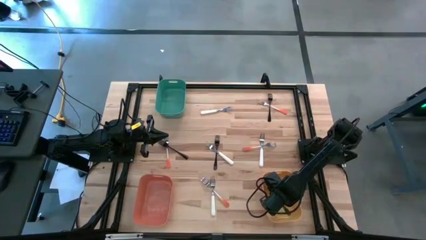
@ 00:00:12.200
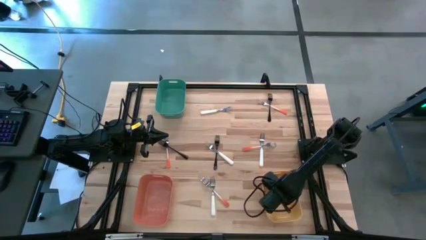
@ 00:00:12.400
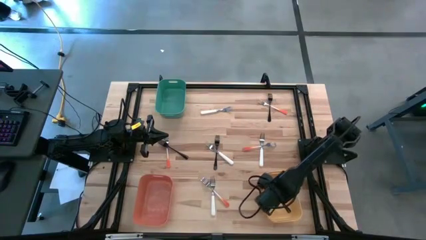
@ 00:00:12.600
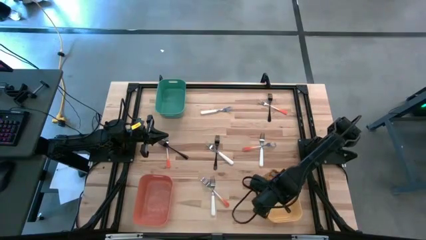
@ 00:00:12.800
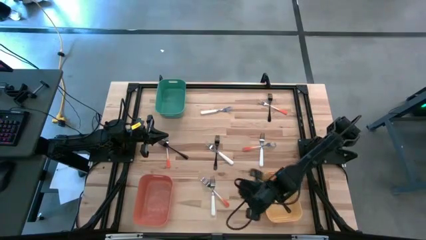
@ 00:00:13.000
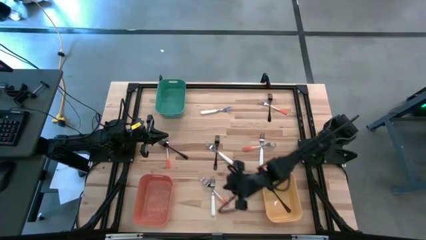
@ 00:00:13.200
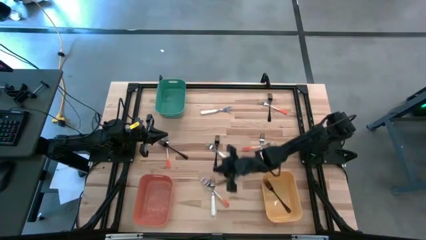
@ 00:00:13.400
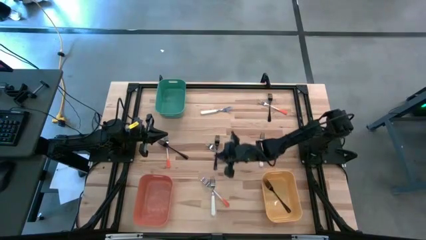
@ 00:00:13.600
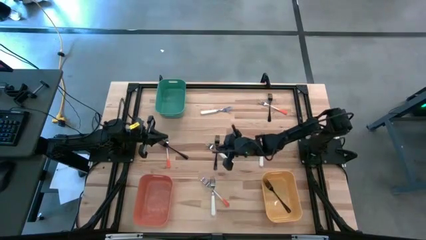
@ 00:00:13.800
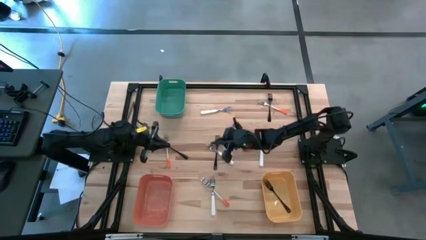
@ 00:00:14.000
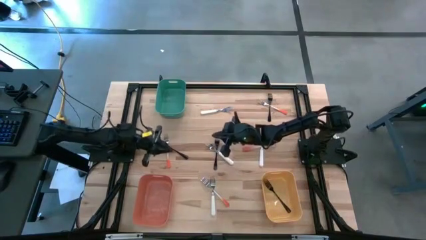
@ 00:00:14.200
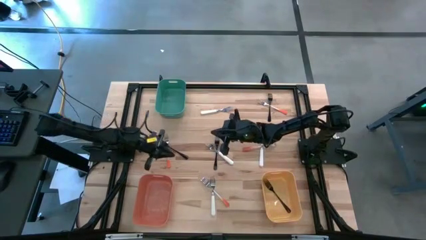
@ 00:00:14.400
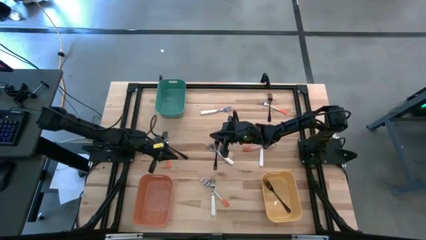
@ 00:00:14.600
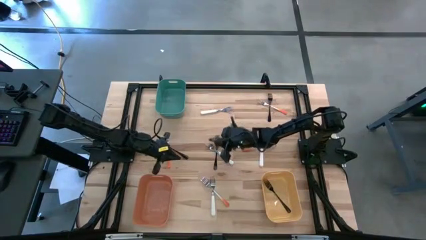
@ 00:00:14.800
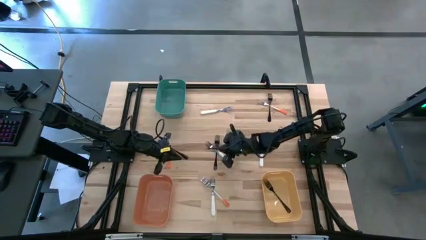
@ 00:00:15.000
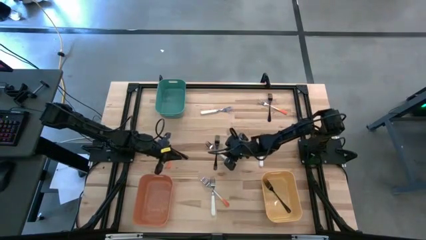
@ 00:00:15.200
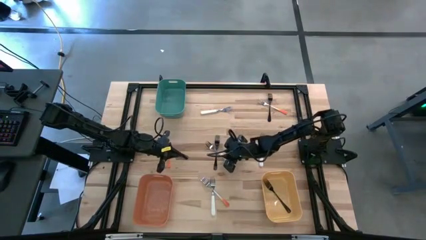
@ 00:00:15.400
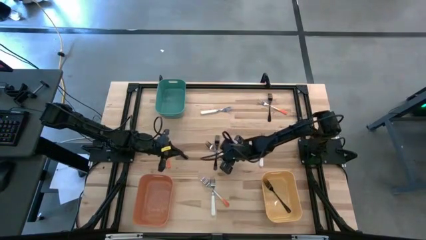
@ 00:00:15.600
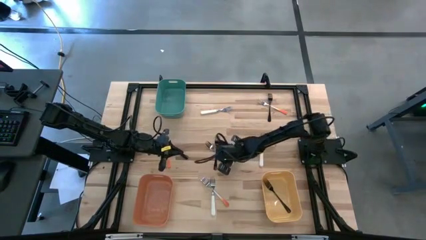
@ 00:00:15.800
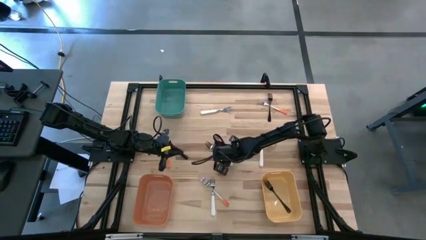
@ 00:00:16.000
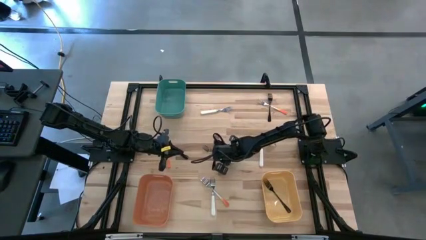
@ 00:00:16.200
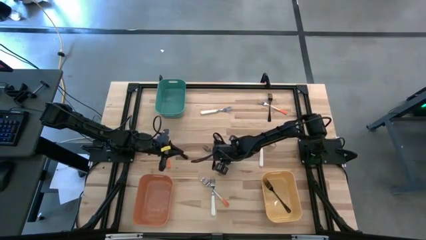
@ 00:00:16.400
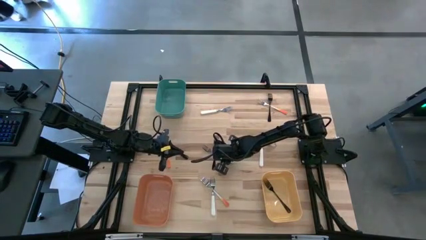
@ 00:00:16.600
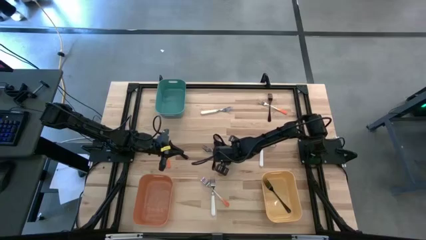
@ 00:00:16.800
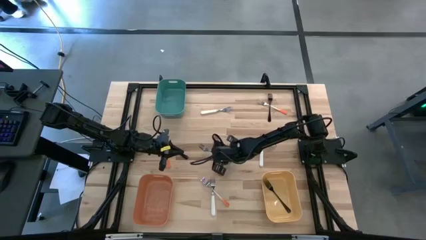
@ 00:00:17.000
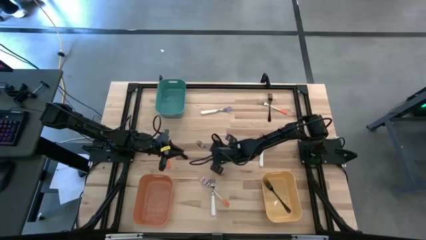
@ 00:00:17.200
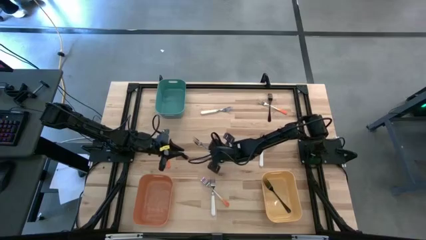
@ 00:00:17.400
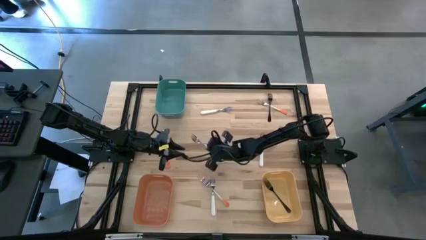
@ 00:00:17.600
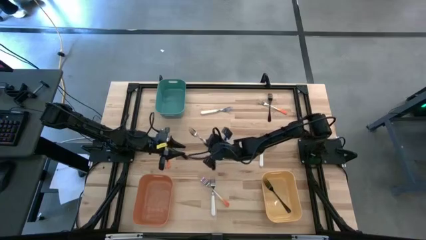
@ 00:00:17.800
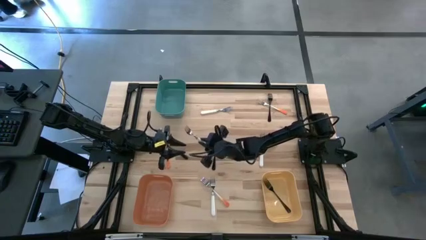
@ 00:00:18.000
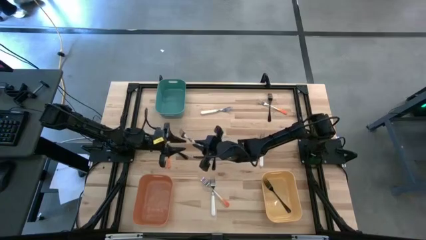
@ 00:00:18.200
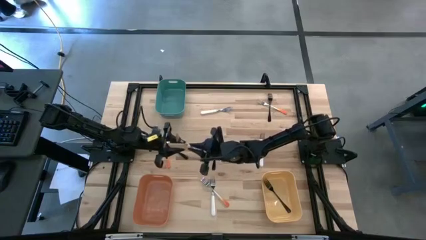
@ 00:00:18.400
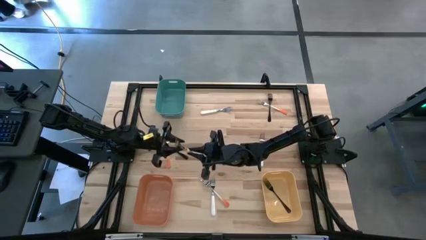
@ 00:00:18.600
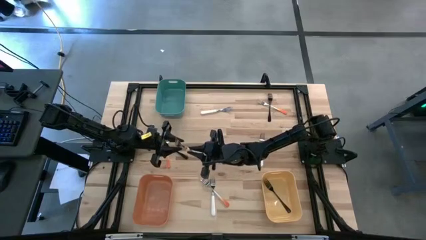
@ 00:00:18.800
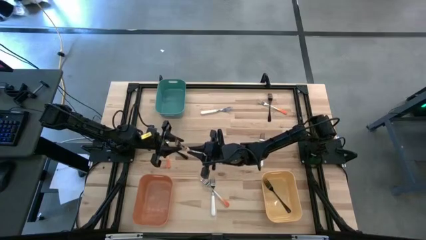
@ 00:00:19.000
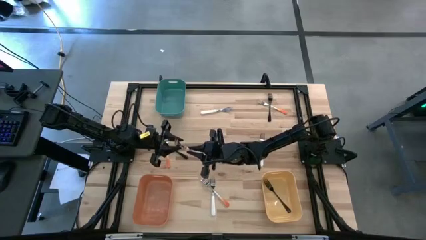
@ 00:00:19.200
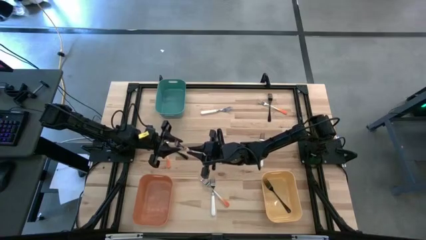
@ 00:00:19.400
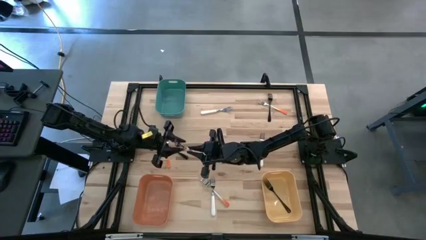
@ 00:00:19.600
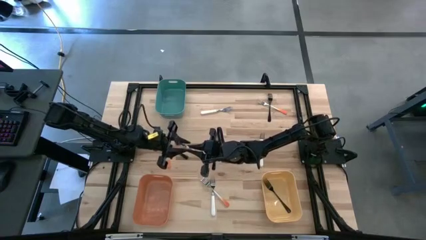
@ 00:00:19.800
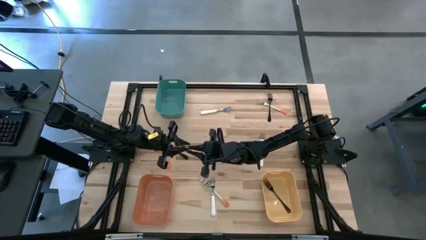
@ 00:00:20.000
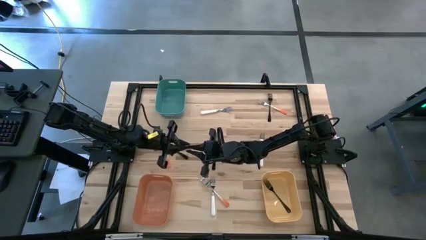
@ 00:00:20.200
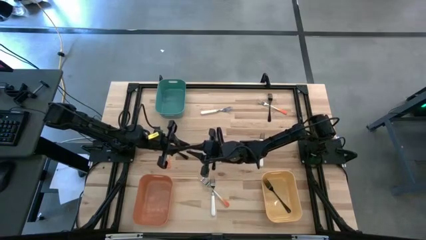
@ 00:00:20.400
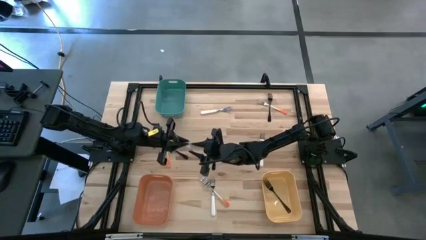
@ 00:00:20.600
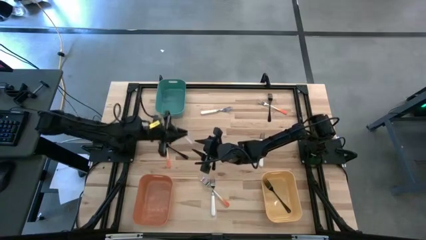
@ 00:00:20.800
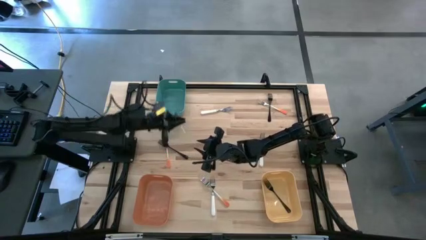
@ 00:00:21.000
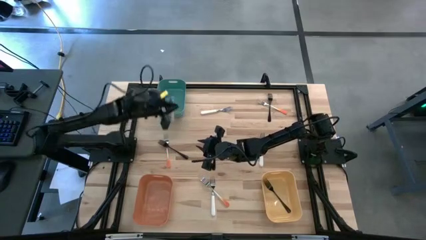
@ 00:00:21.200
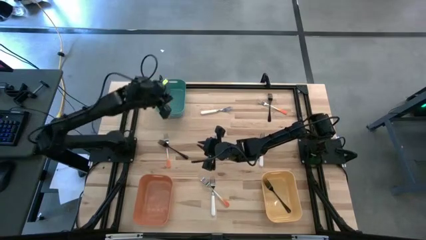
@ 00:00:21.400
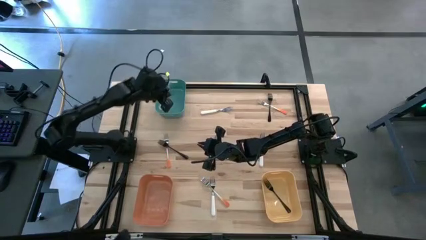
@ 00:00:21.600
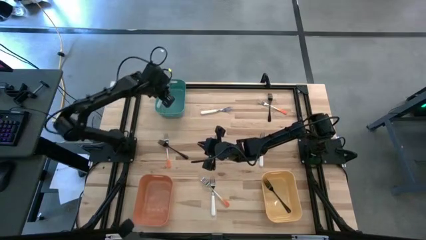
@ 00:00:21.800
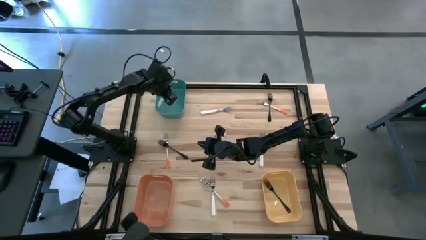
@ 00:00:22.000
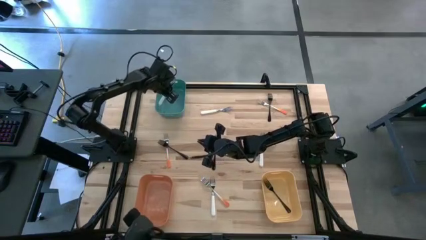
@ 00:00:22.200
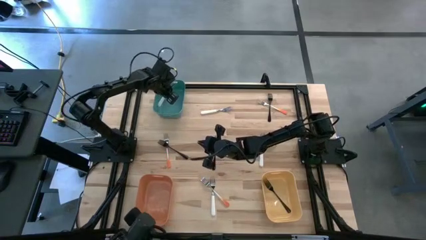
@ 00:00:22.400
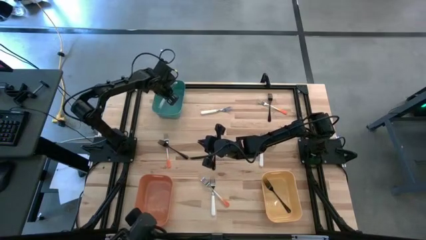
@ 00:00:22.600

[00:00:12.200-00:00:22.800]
Task: Sort silverware by color (type)
Put the white fork into the green bin

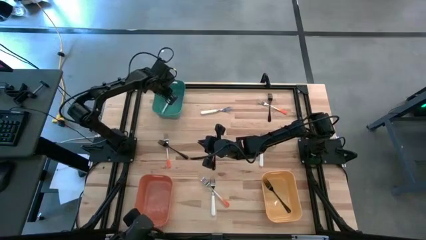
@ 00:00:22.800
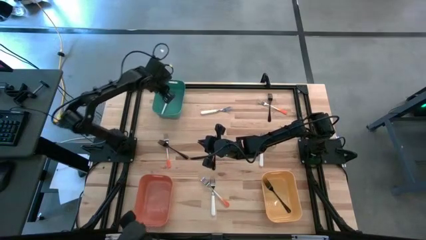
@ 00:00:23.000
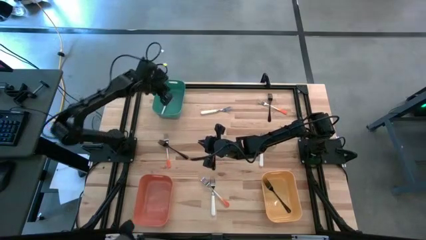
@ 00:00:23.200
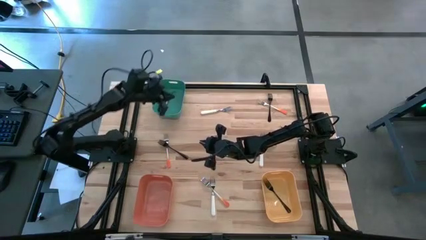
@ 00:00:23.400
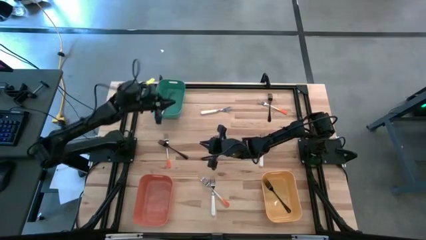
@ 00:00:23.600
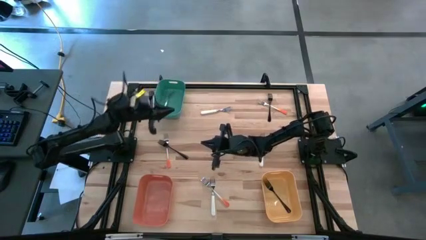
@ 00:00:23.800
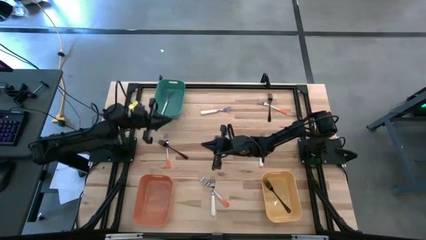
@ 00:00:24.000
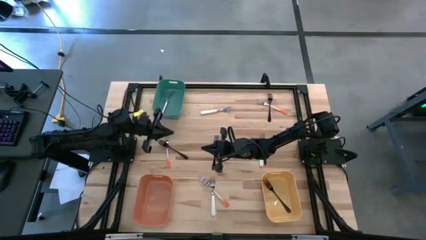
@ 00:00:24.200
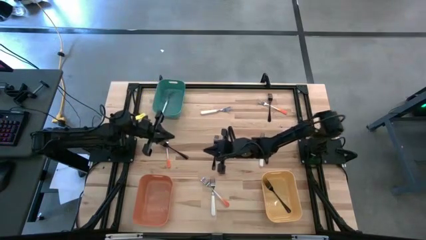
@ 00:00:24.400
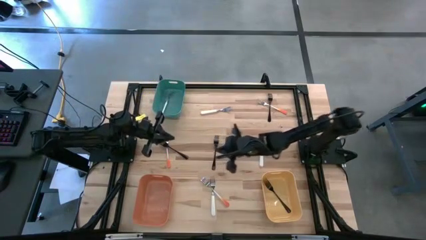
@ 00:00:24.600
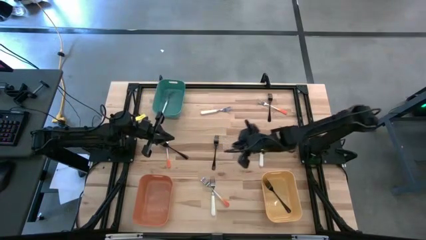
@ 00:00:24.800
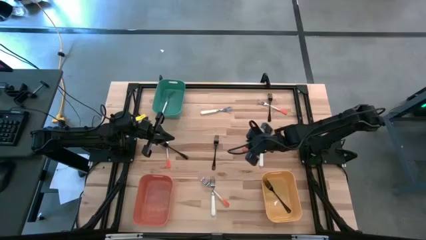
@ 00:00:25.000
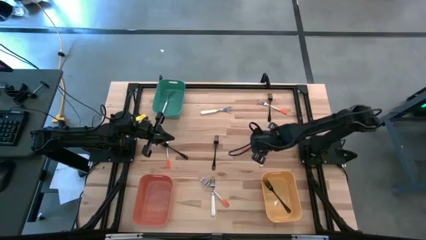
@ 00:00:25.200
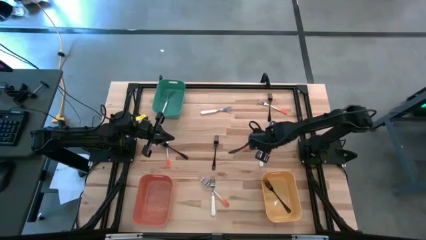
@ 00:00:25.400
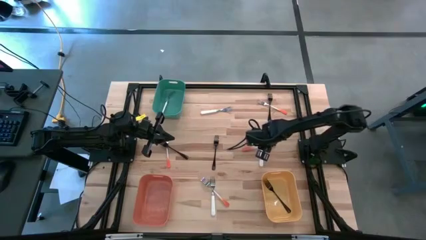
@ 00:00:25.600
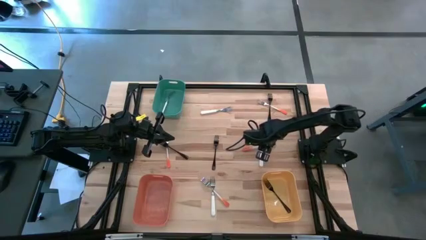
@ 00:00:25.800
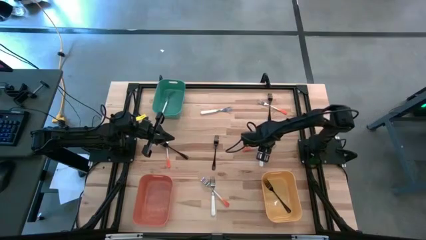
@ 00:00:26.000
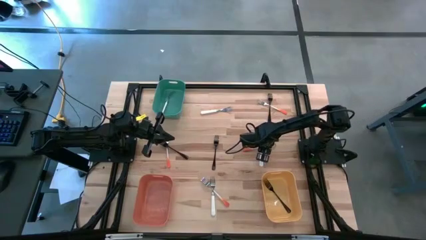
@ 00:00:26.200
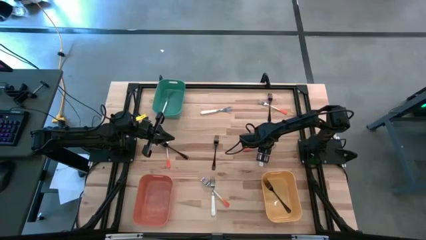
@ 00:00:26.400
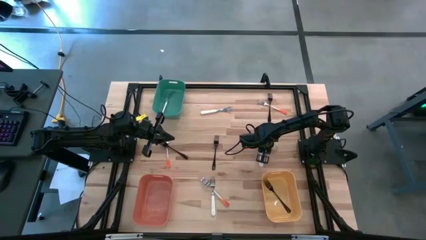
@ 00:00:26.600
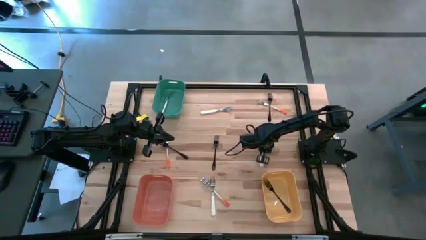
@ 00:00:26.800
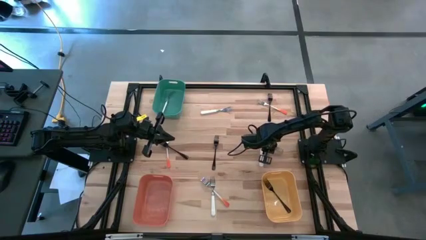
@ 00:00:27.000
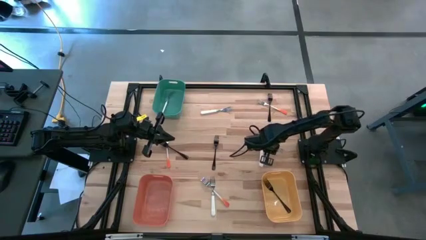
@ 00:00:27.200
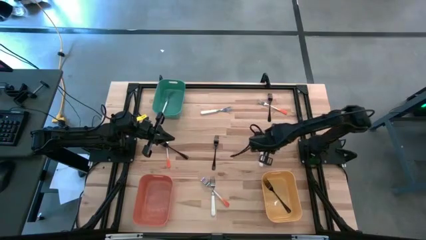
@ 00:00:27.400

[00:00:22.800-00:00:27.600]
Put the orange fork into the orange bin
